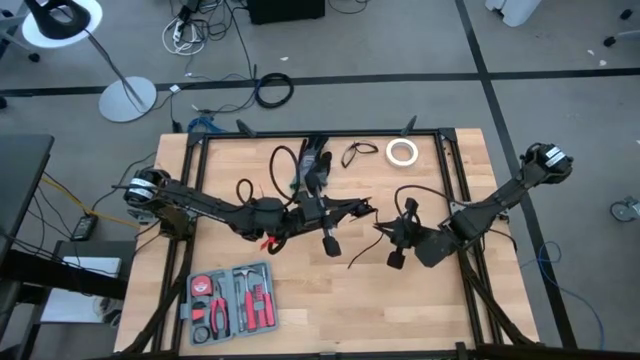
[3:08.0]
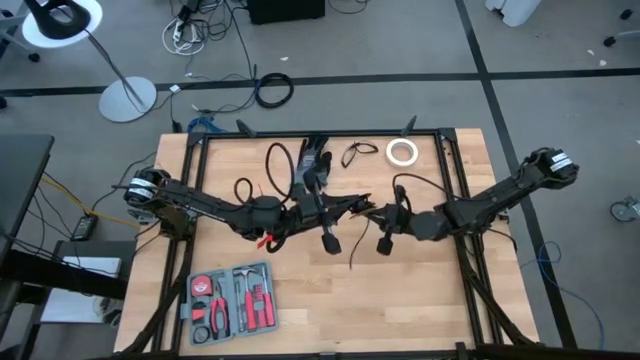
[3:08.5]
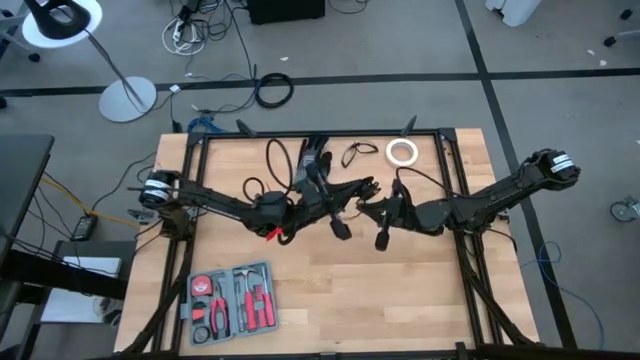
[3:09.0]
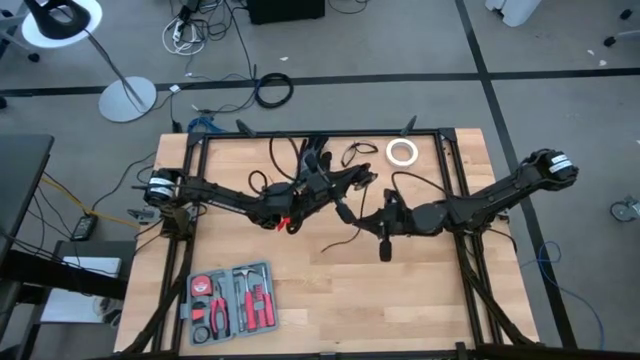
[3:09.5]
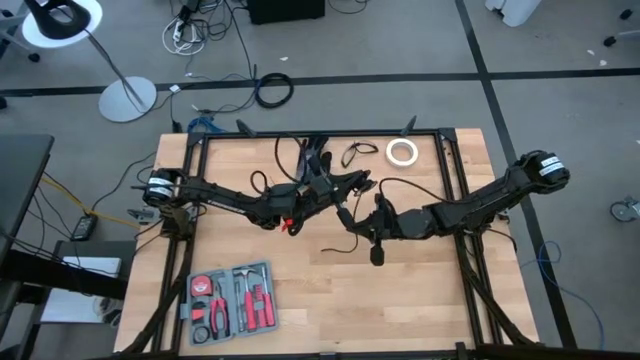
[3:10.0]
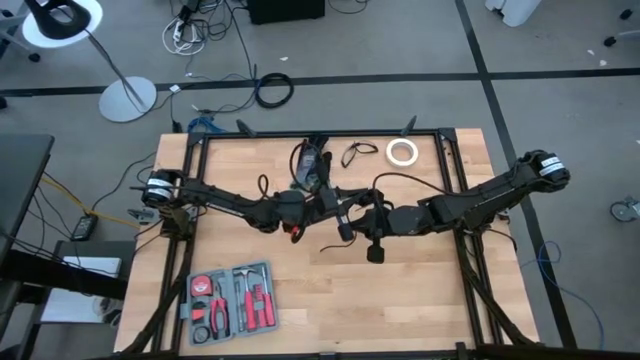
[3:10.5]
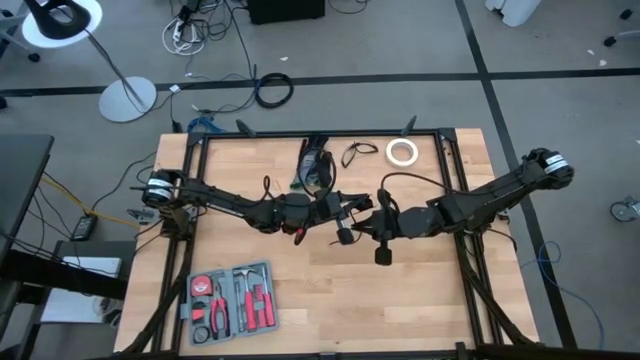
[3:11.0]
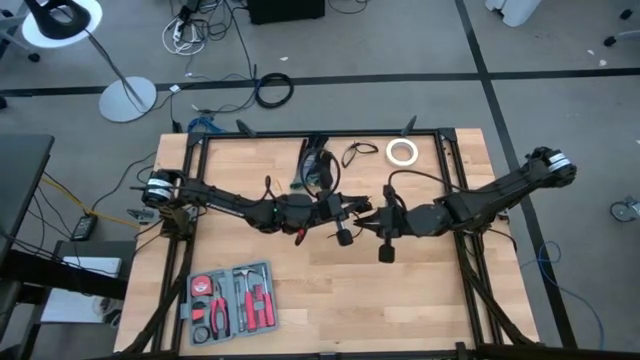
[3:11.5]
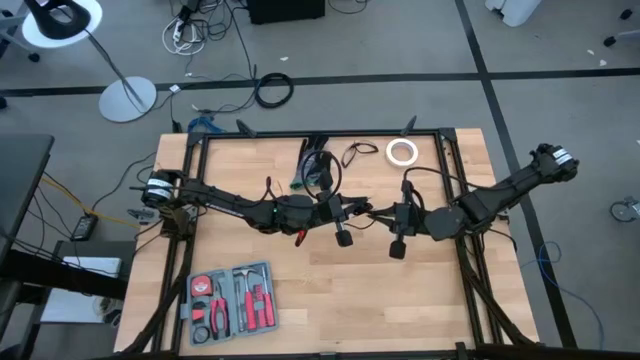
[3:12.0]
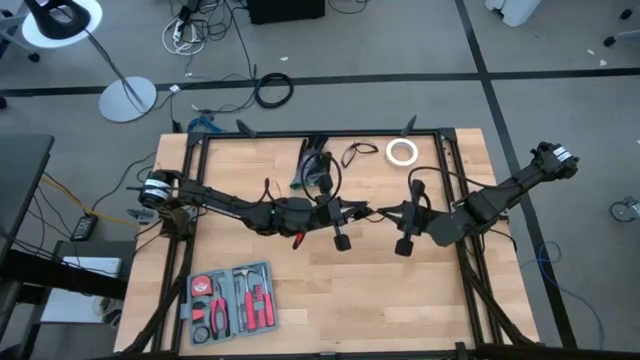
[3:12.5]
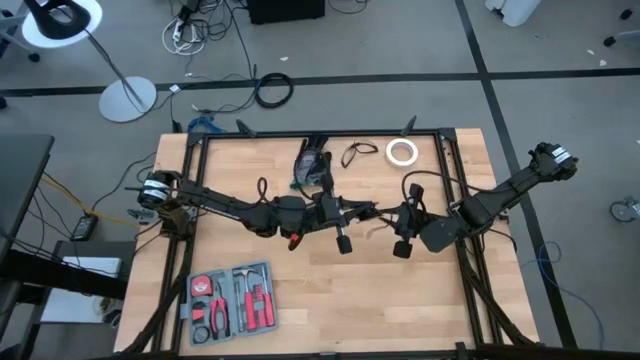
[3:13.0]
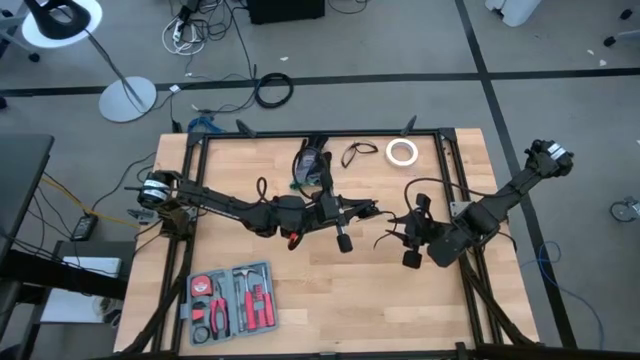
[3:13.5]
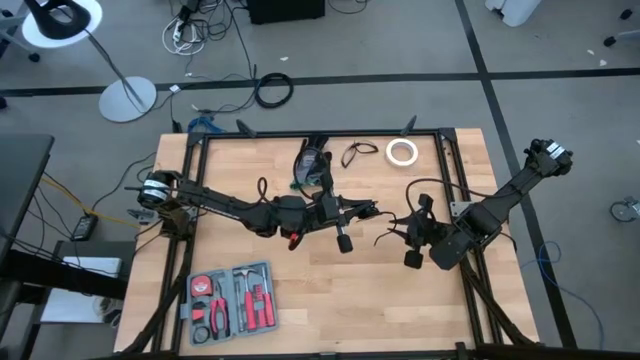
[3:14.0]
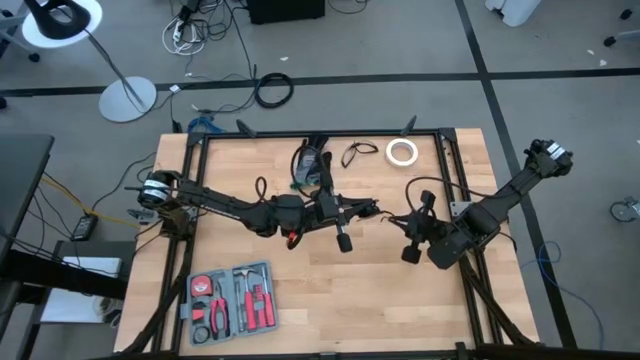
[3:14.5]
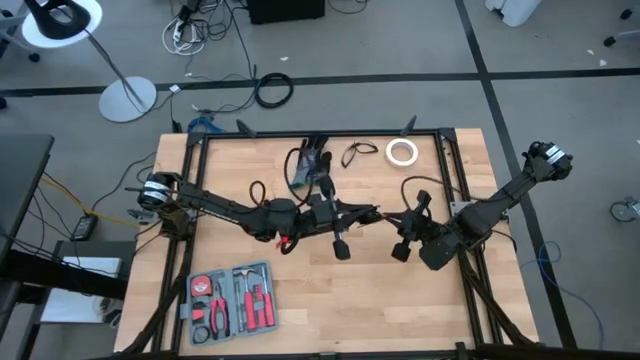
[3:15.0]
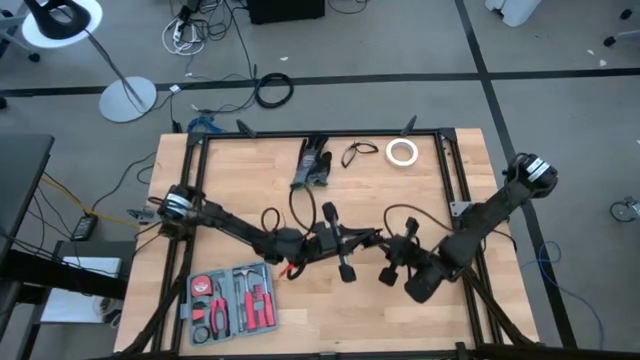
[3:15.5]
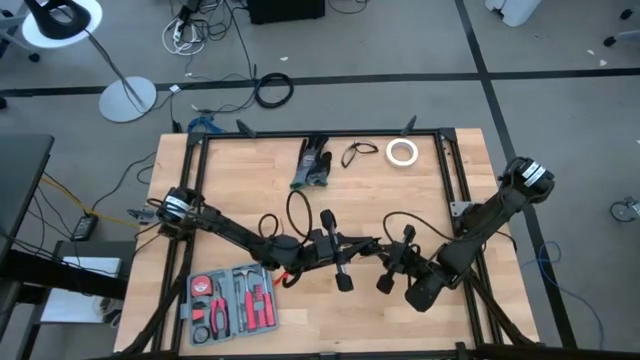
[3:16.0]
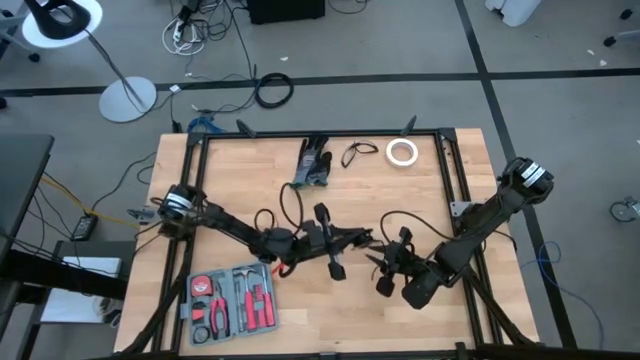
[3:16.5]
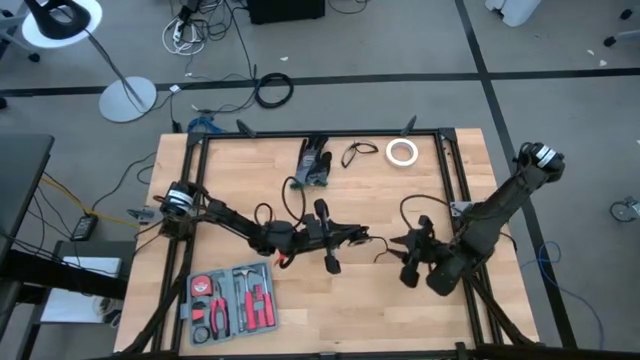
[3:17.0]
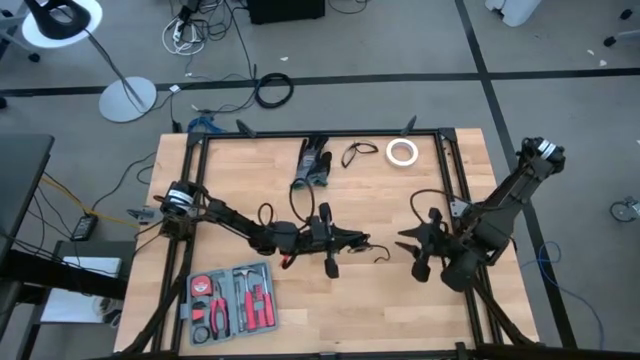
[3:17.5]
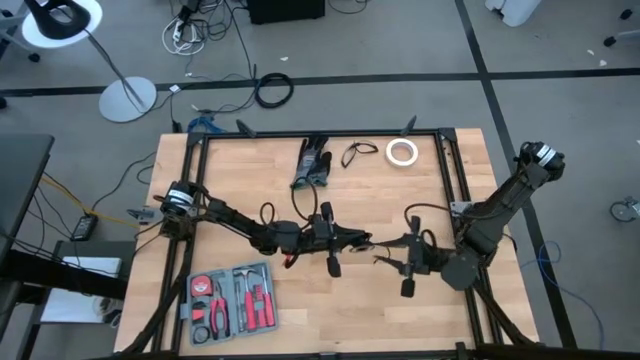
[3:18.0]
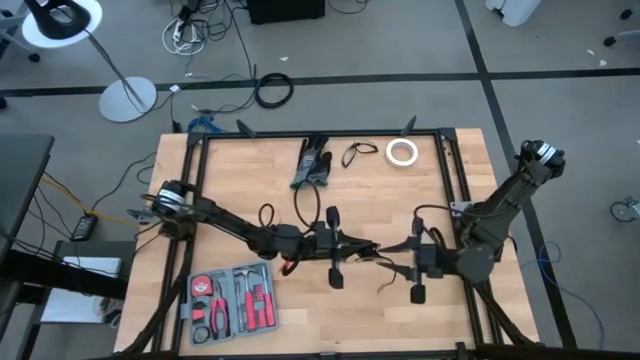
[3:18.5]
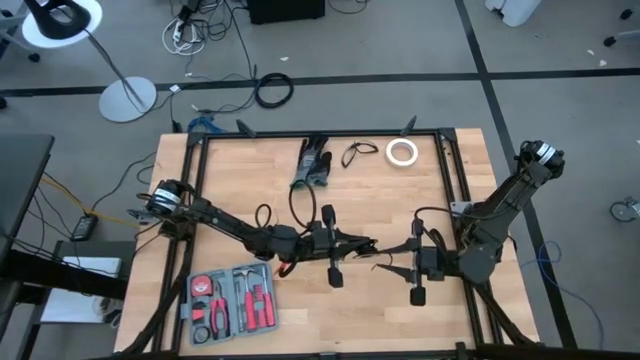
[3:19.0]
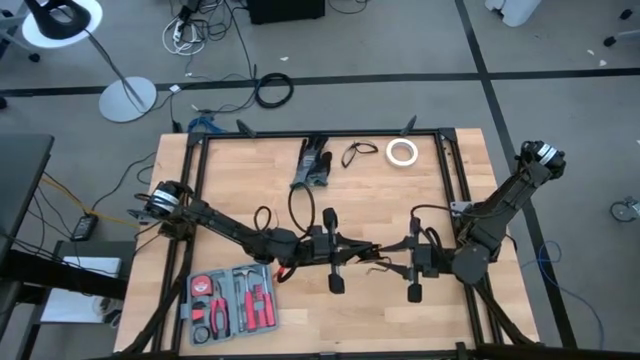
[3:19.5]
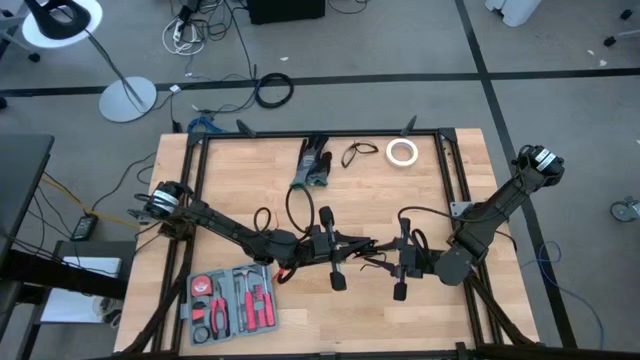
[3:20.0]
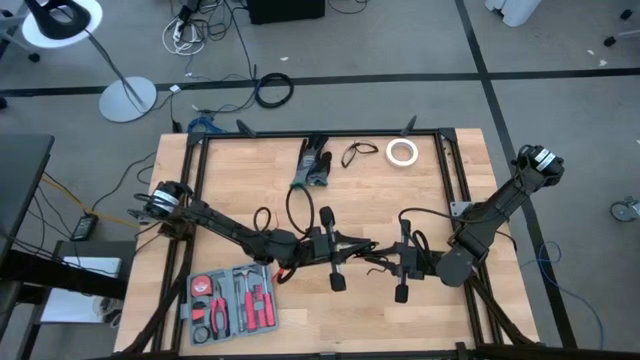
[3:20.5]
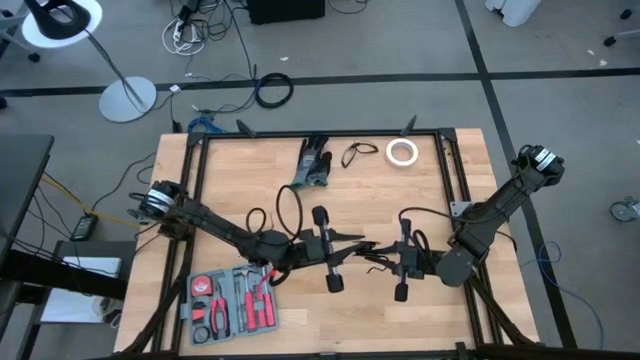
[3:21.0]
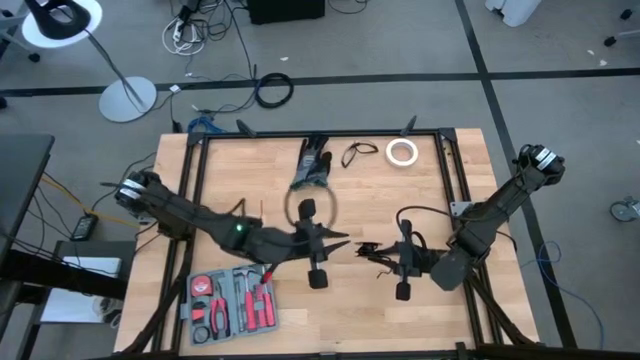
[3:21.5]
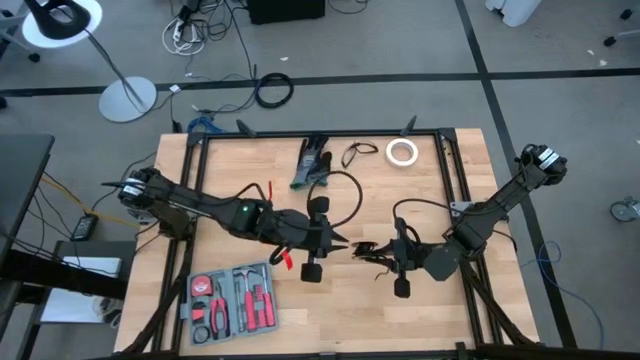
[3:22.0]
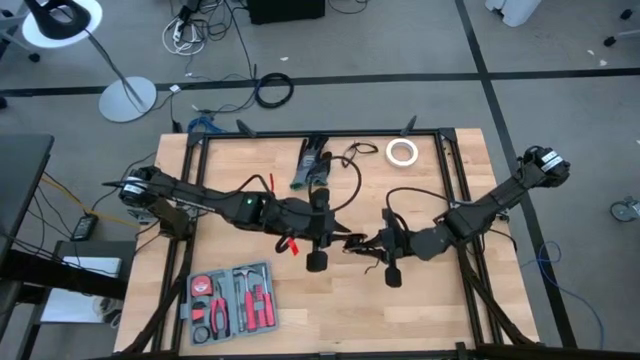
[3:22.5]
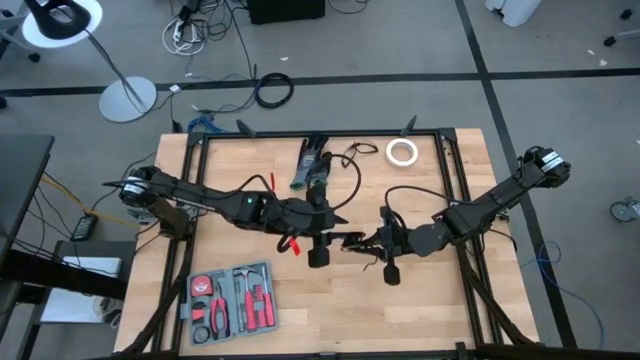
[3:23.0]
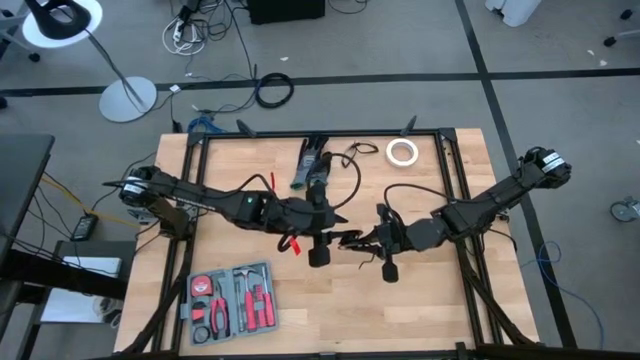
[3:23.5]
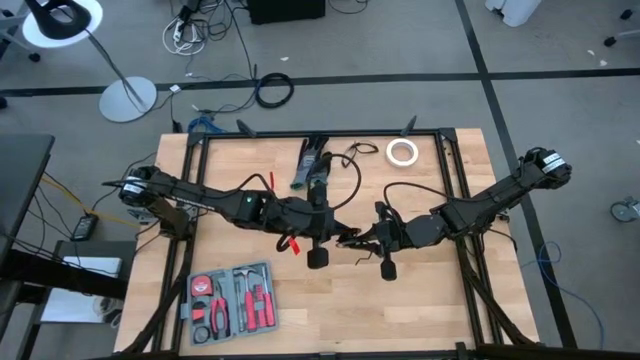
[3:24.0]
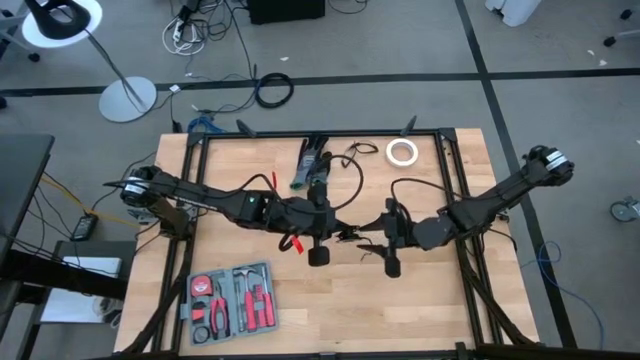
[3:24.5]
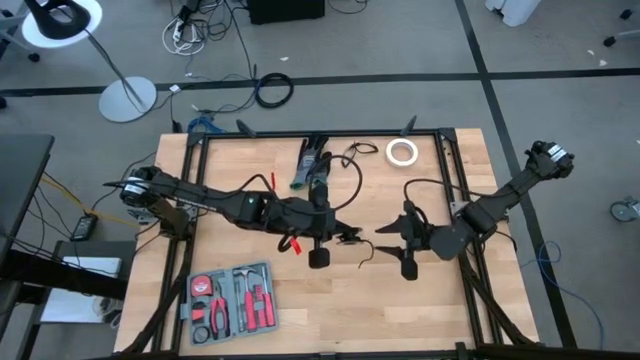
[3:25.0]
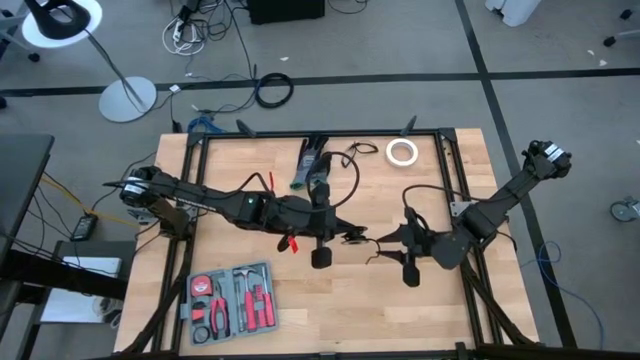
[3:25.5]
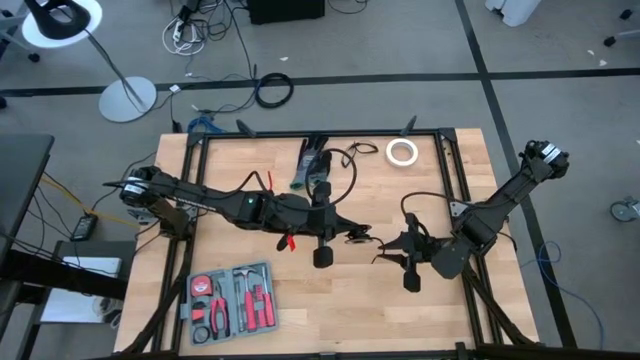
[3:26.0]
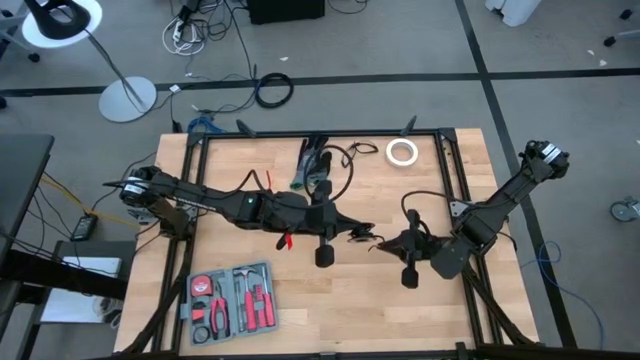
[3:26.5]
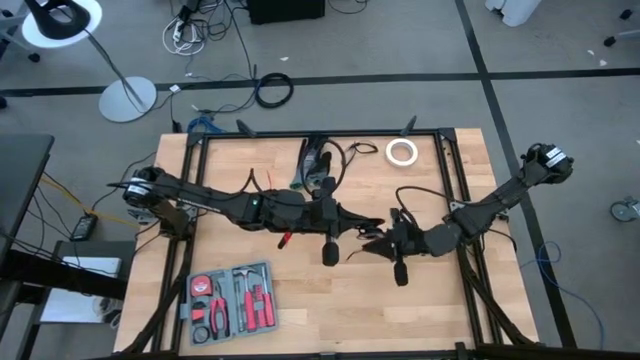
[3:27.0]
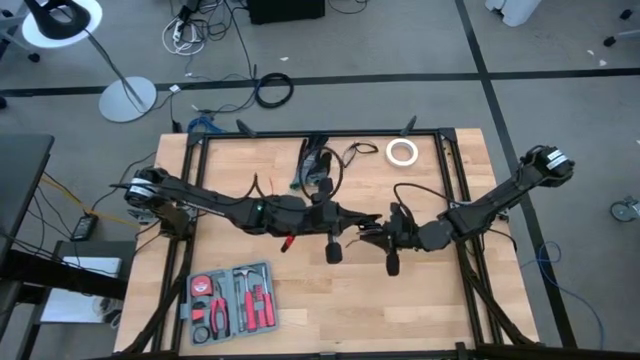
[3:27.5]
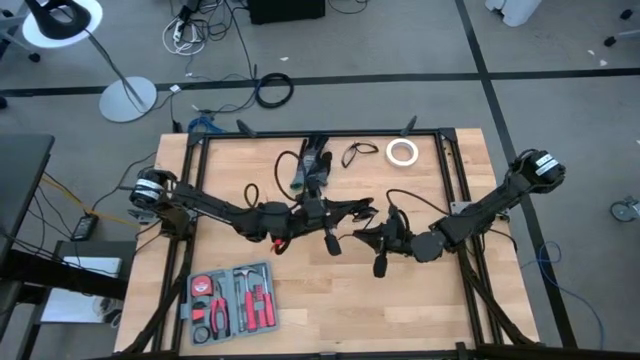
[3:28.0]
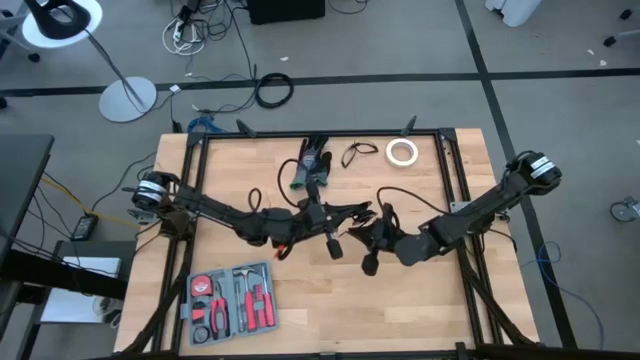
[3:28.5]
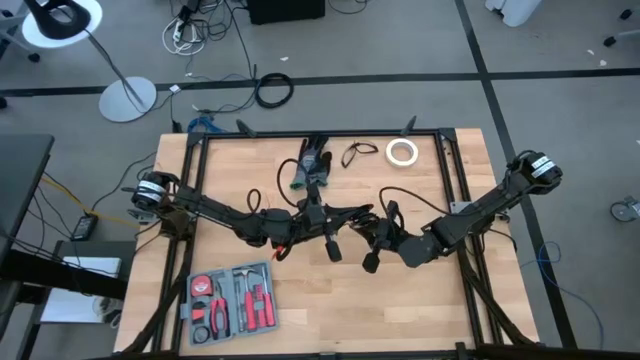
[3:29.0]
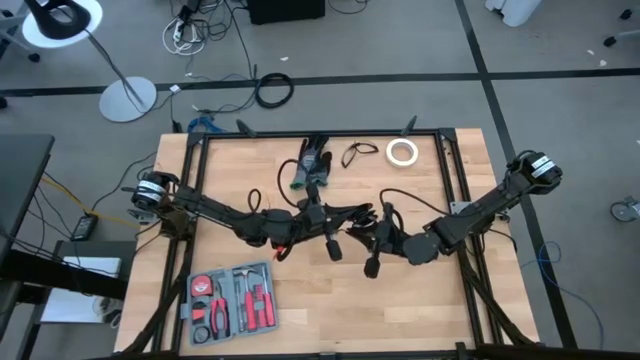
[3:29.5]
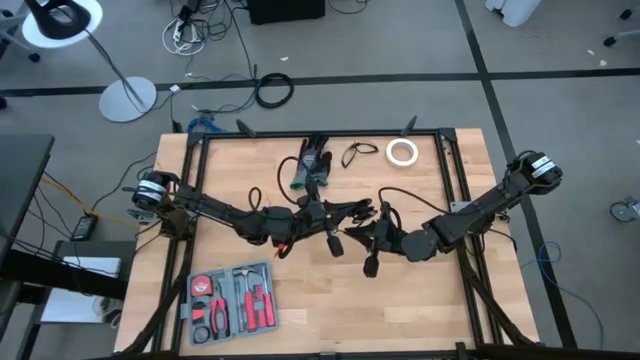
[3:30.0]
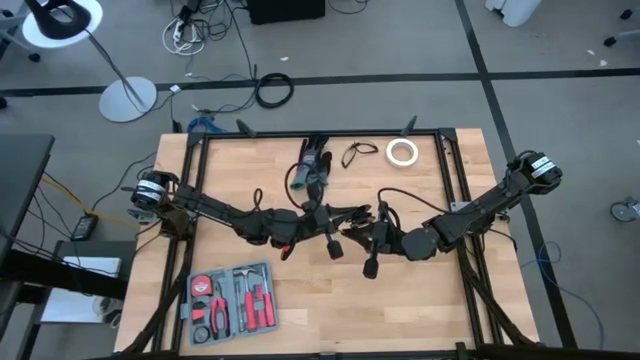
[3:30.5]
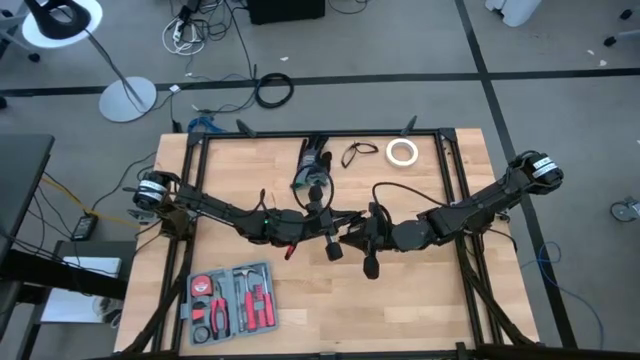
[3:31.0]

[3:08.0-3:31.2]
Task: Coil cords
Coil the black wire into a spool

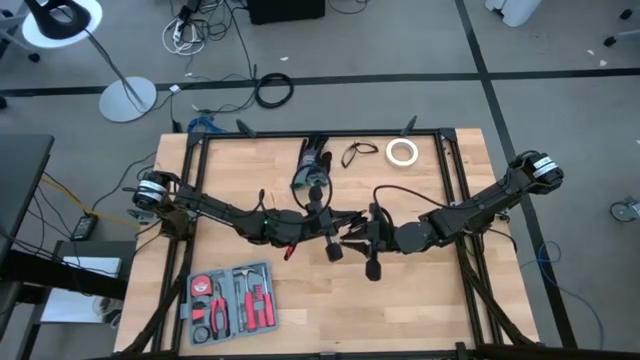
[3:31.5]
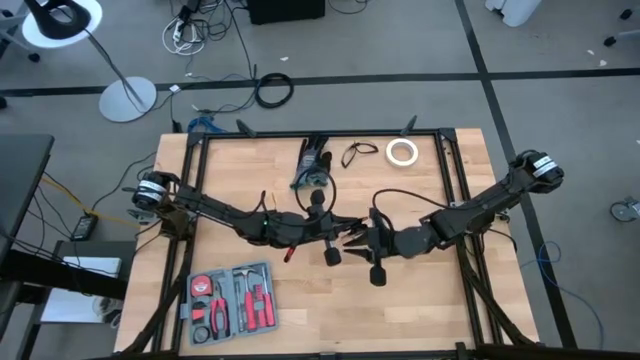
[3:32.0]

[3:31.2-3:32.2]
Coil the black wire into a spool
